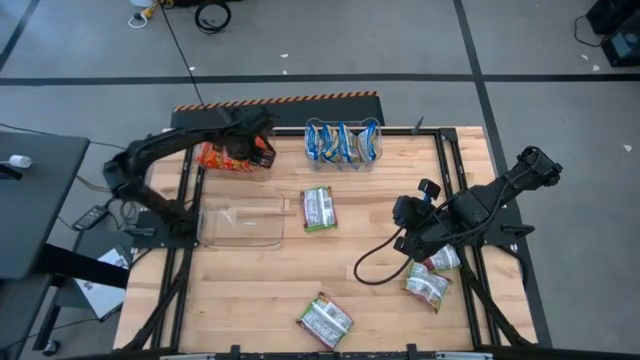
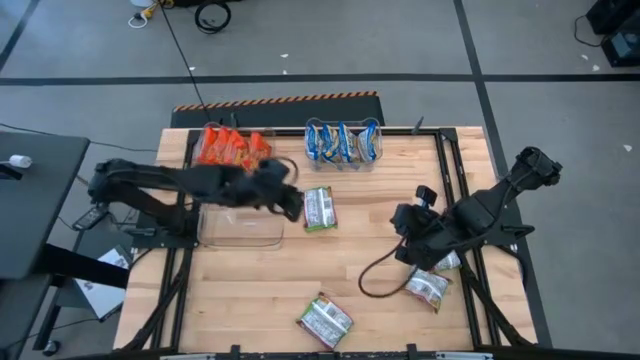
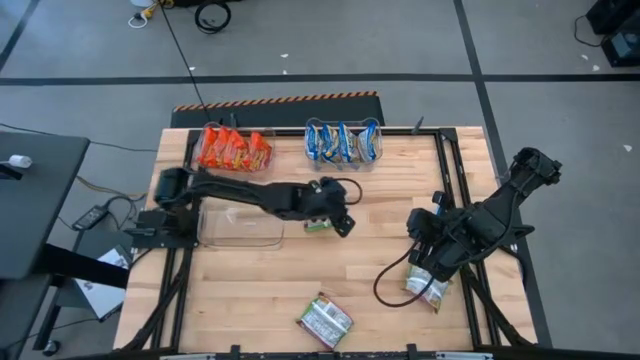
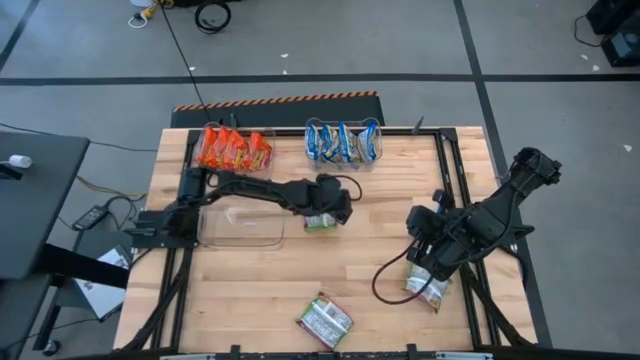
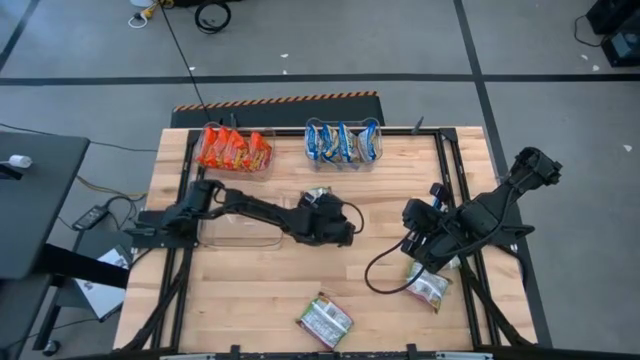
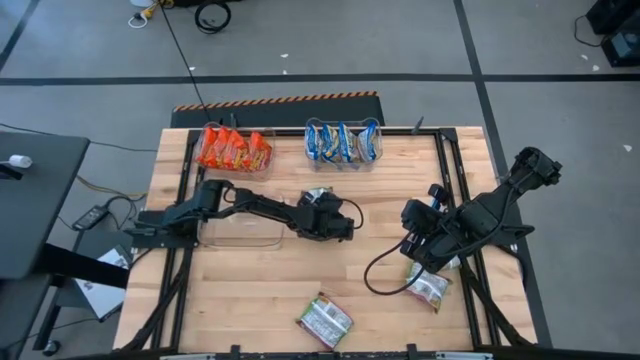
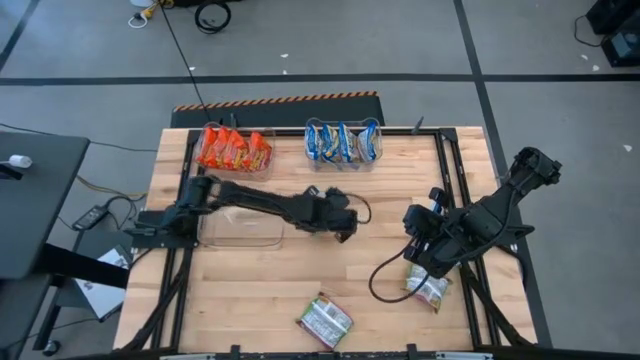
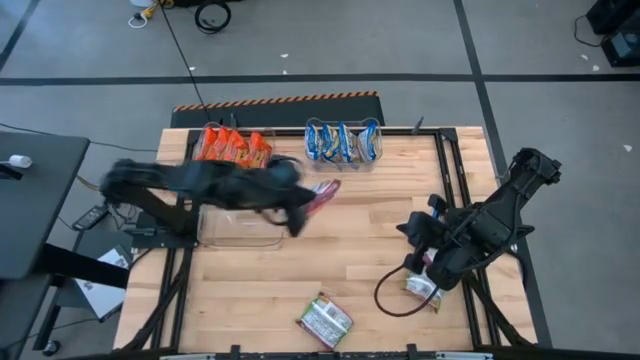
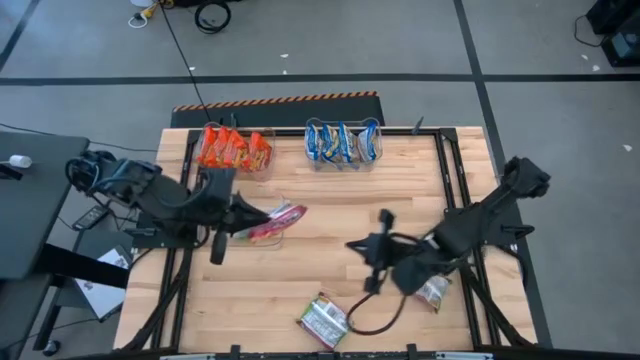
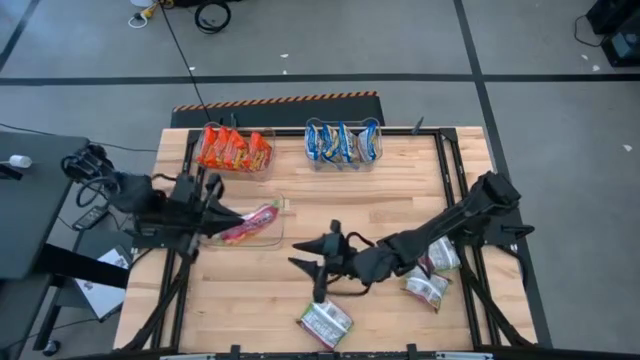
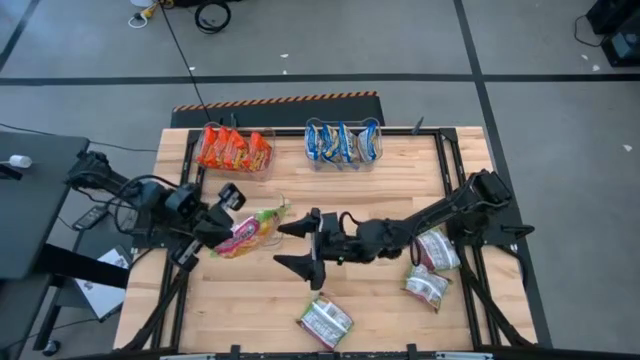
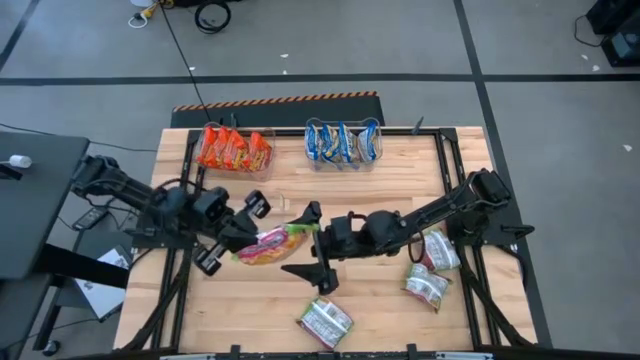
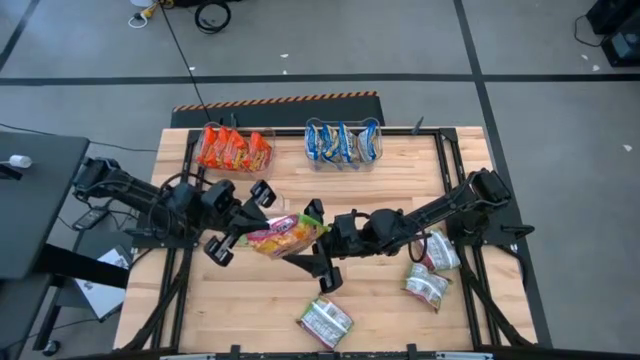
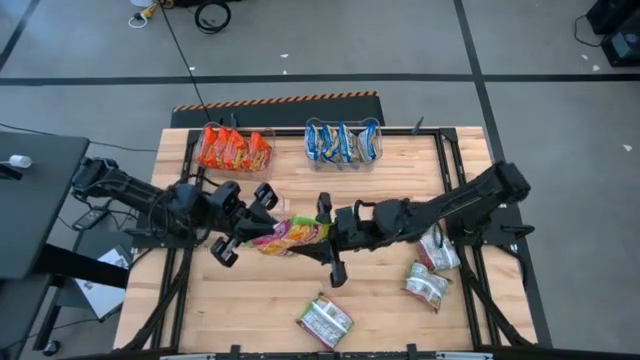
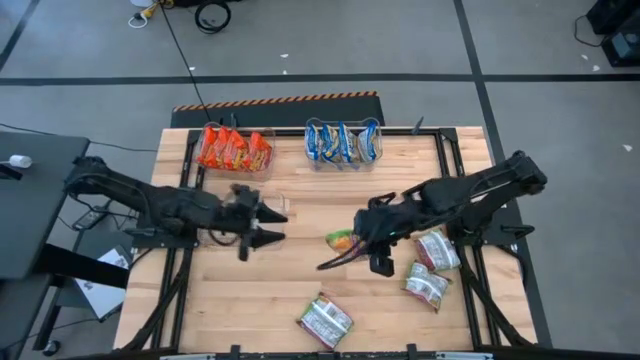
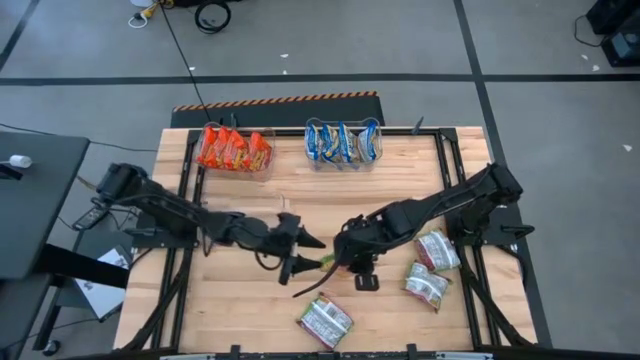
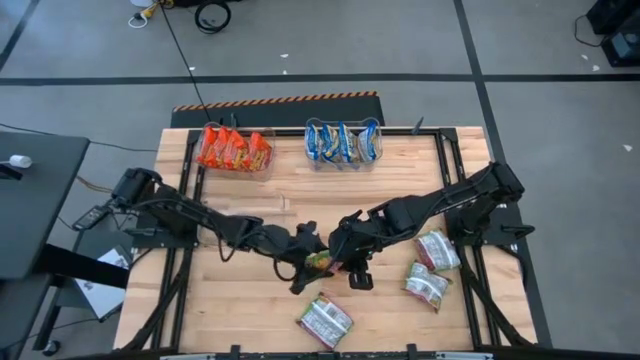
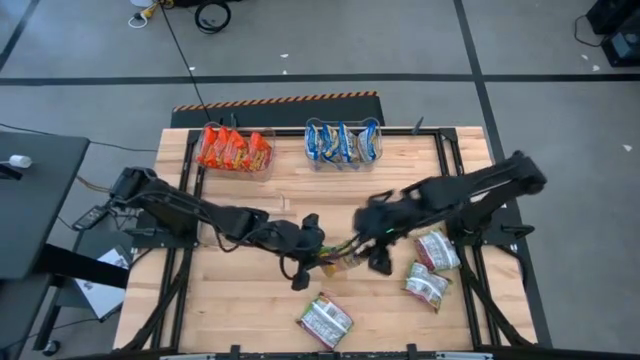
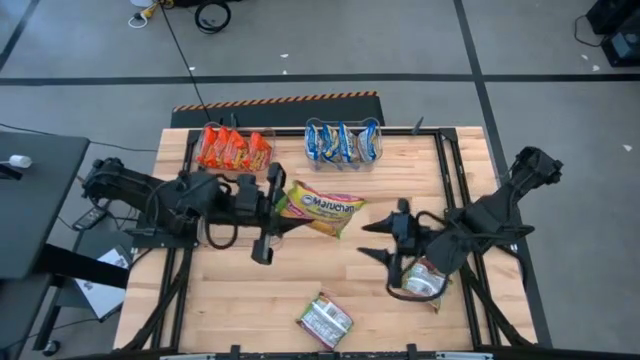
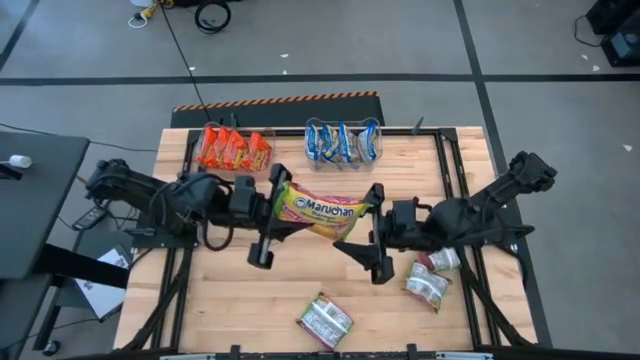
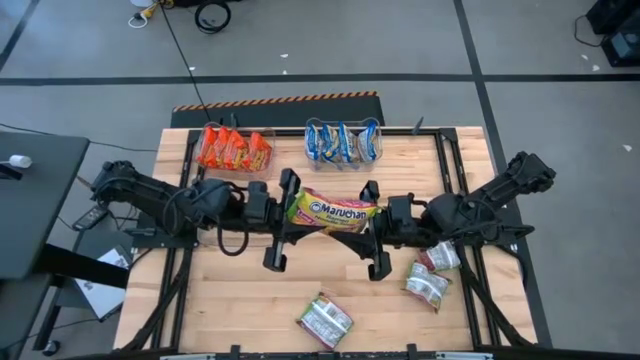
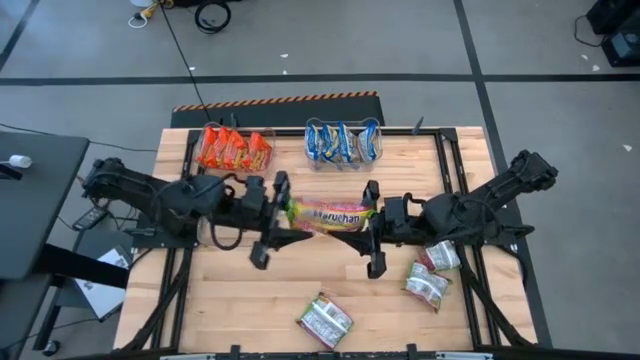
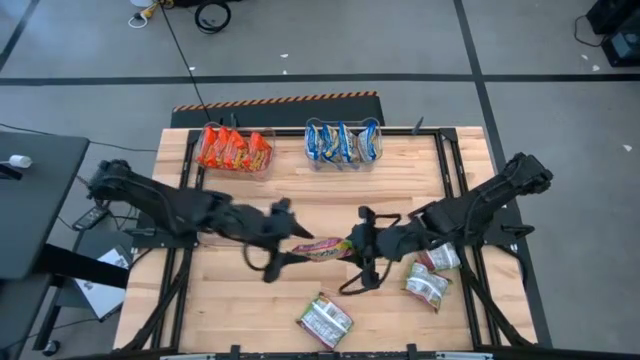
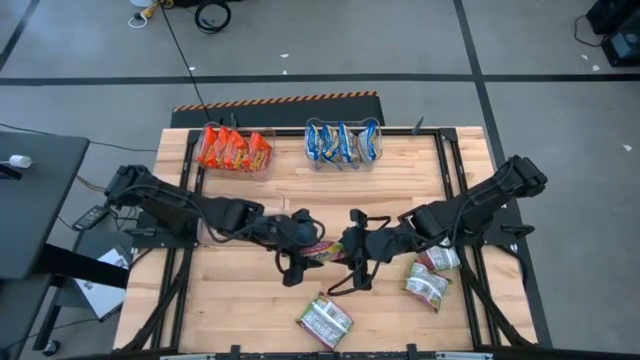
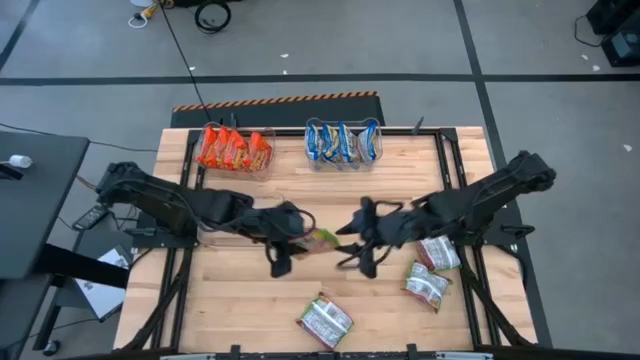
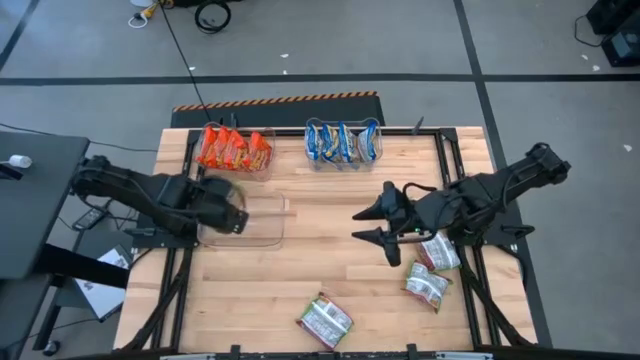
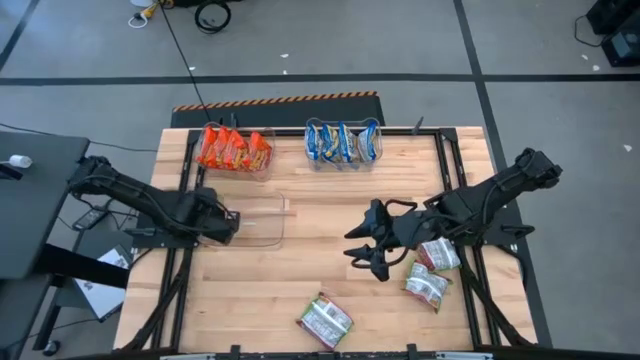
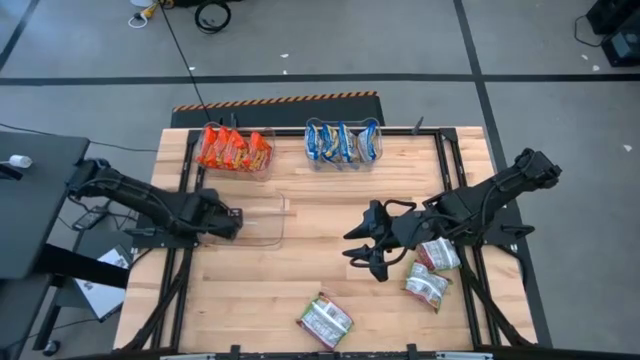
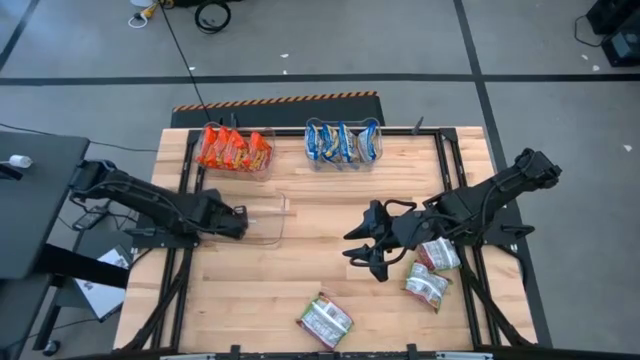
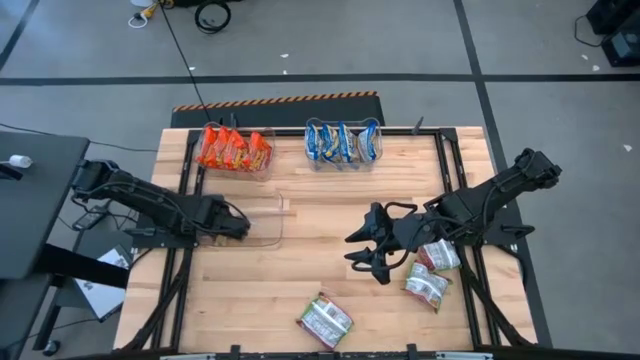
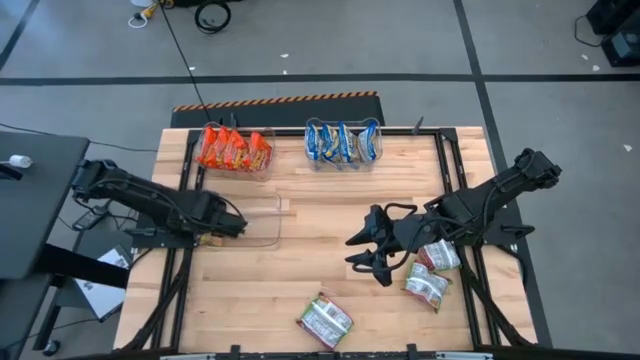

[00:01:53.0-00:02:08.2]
Task: Sort Maruchan noodles
Put the yellow noodle pack into the bottom transparent bin

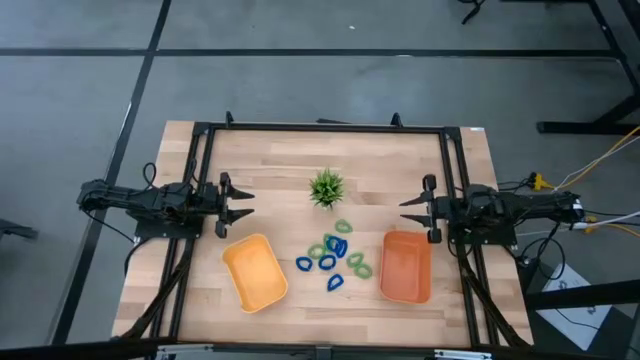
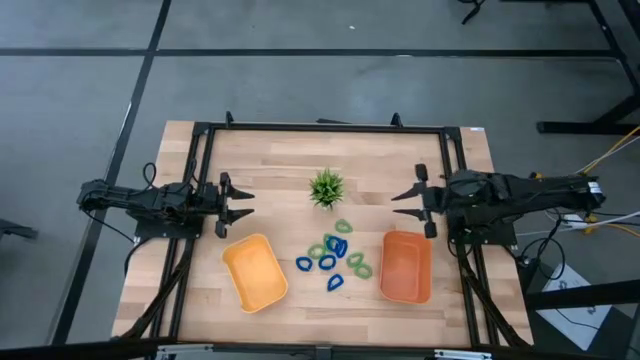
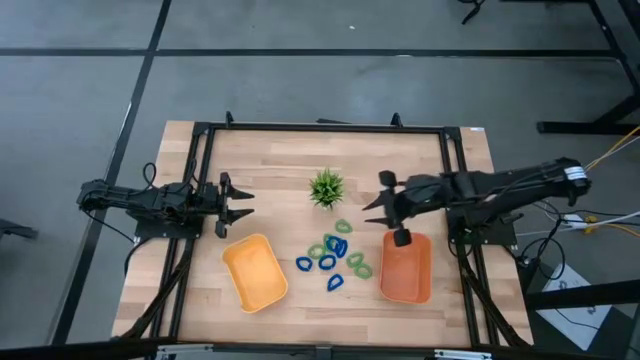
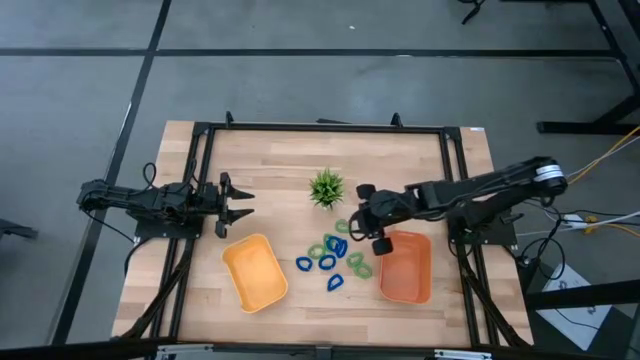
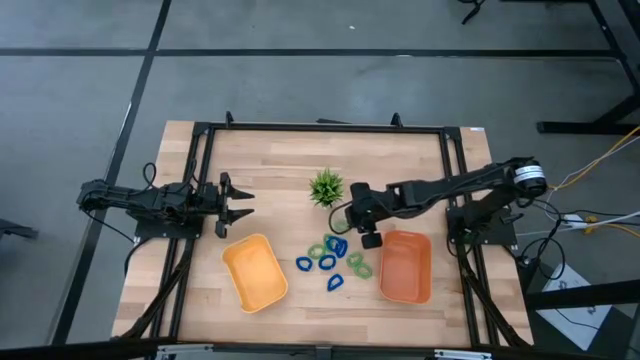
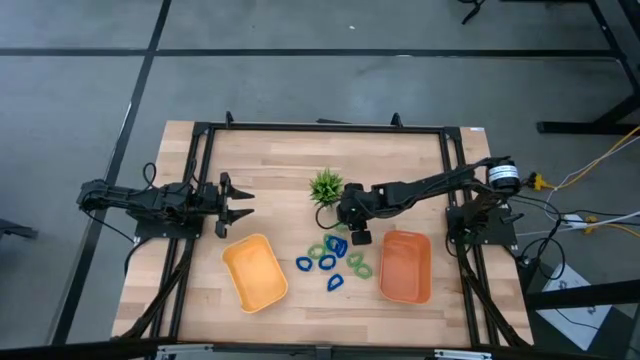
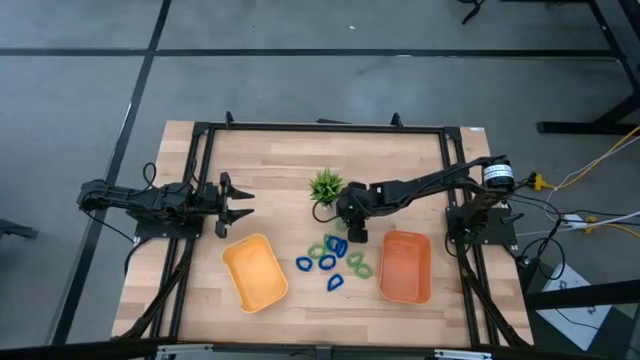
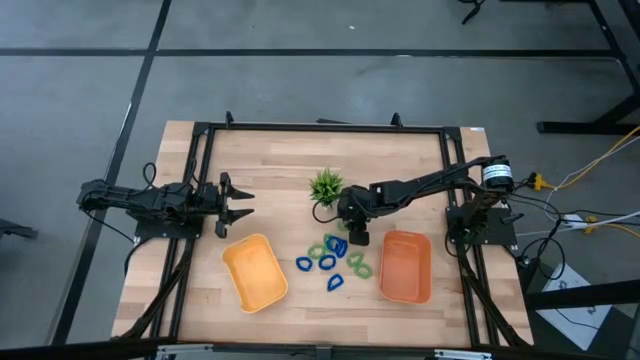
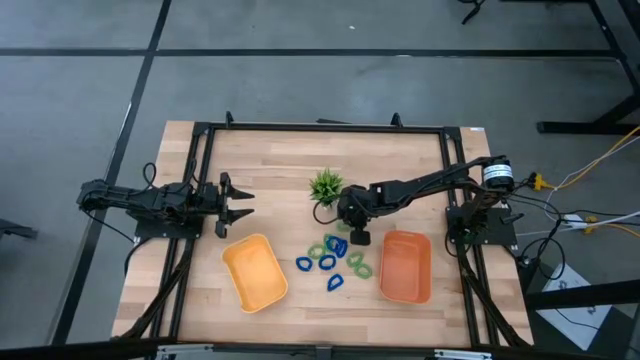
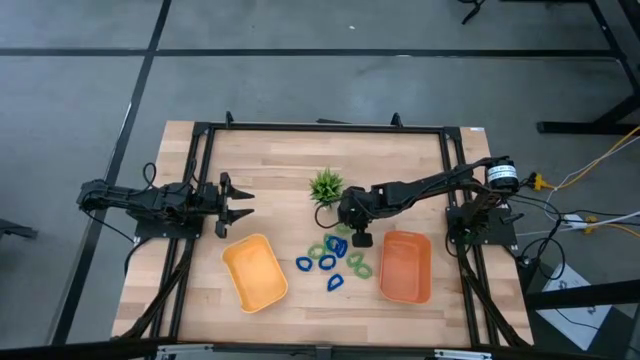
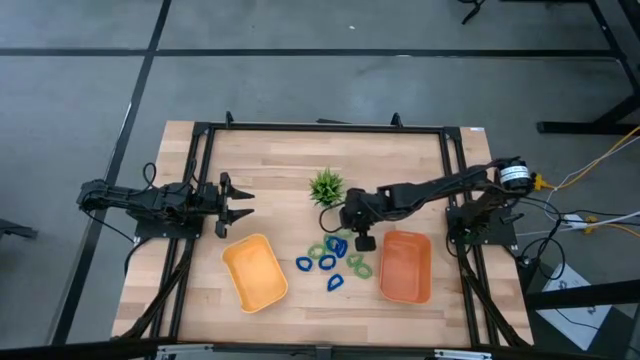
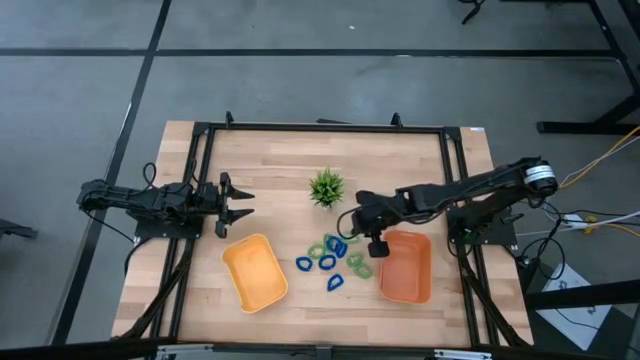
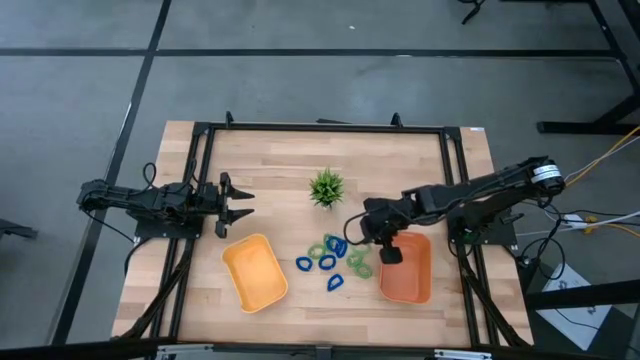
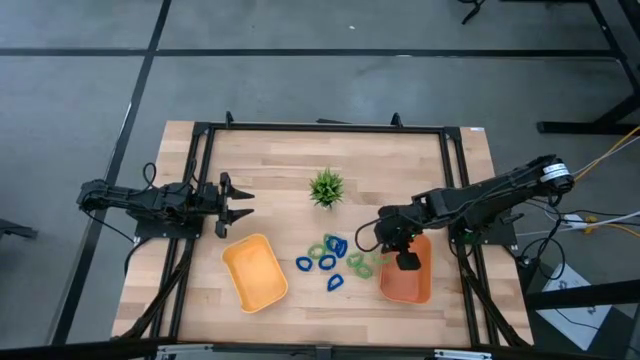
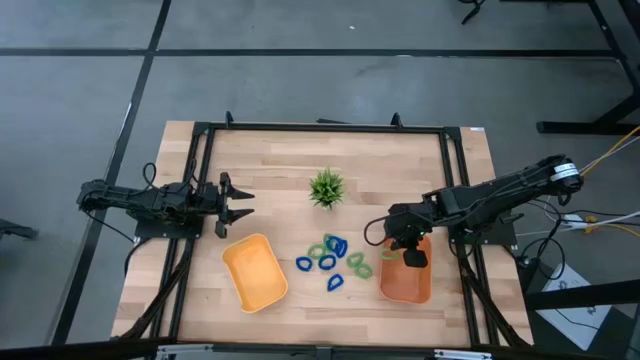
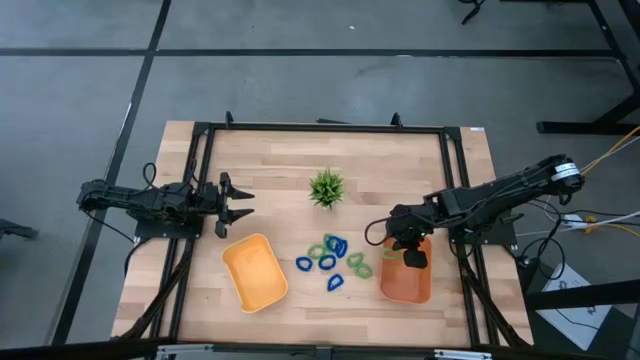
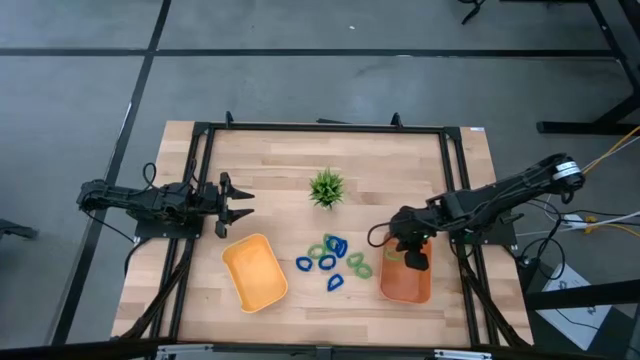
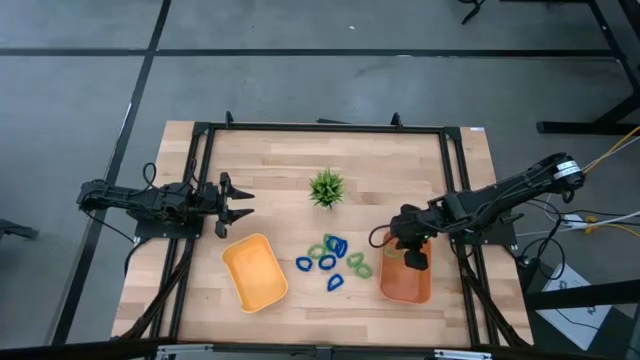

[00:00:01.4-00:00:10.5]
Task: Sort spring keychains
Put the green spring keychain into the orange bin
